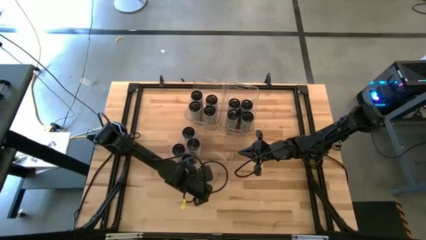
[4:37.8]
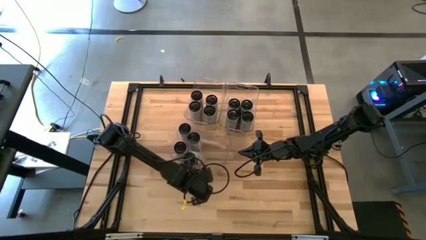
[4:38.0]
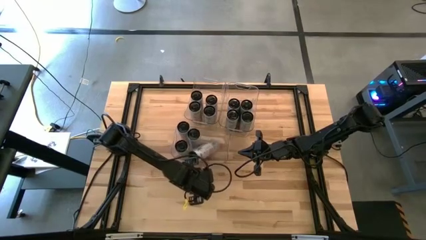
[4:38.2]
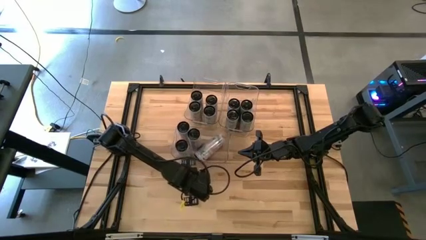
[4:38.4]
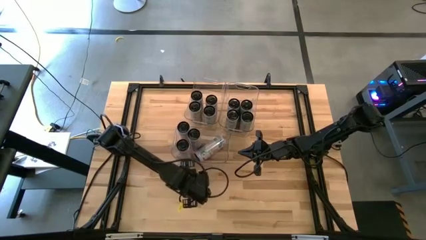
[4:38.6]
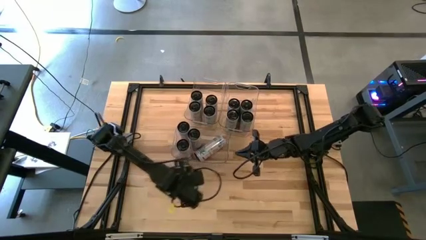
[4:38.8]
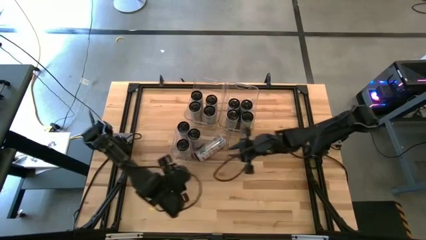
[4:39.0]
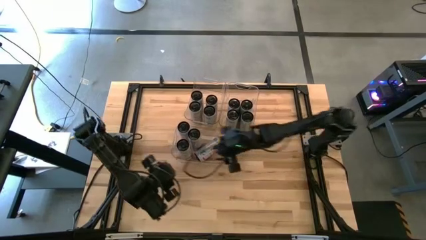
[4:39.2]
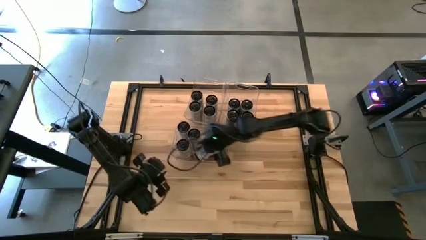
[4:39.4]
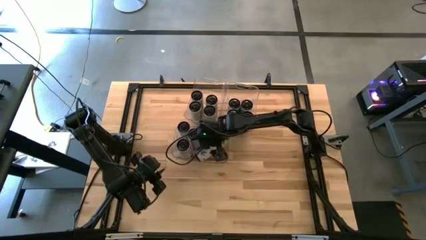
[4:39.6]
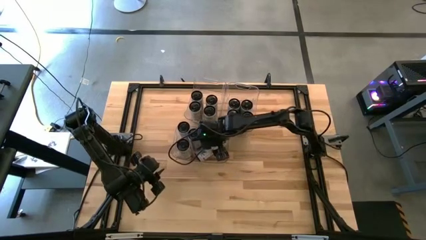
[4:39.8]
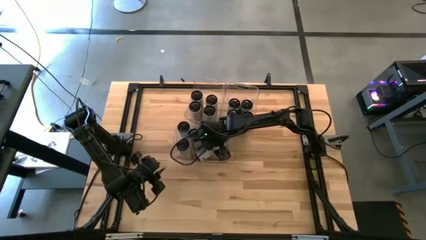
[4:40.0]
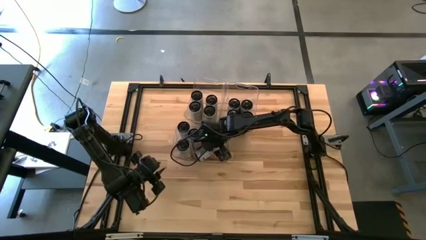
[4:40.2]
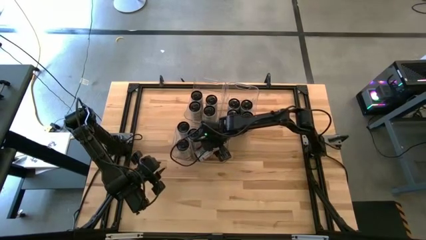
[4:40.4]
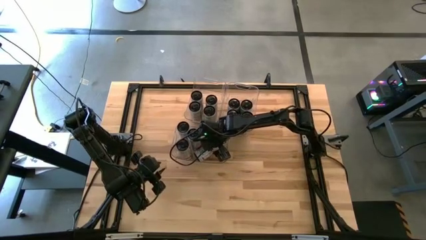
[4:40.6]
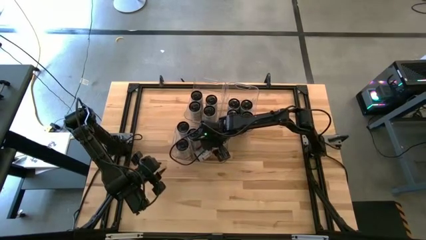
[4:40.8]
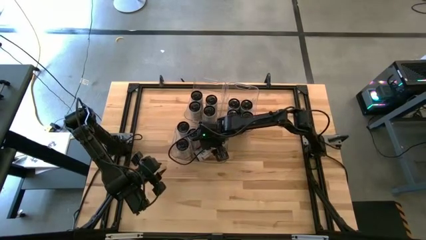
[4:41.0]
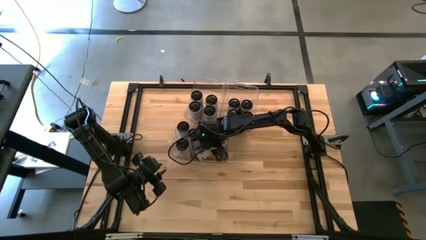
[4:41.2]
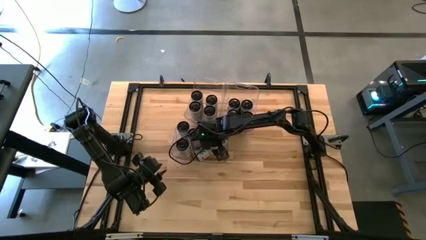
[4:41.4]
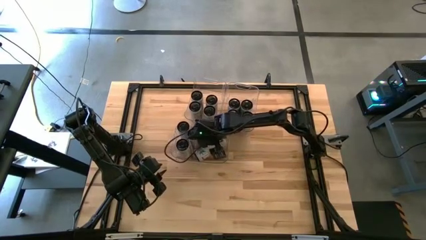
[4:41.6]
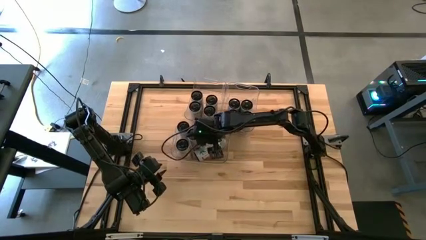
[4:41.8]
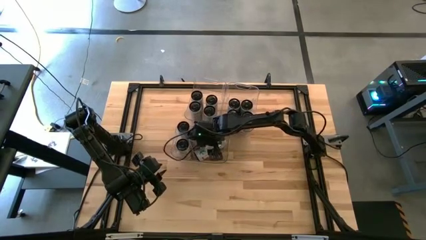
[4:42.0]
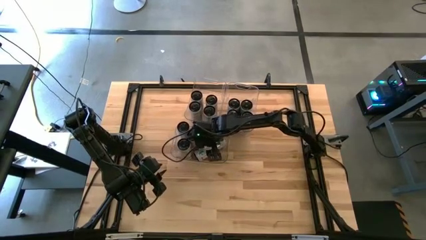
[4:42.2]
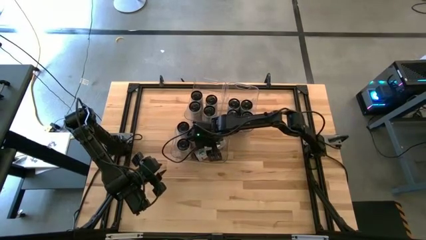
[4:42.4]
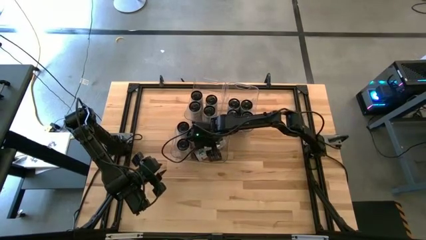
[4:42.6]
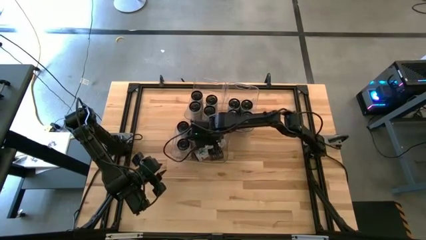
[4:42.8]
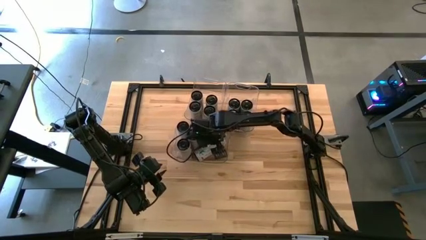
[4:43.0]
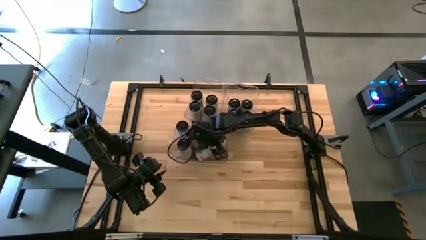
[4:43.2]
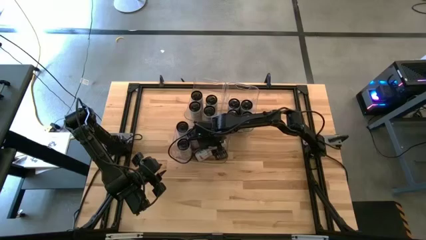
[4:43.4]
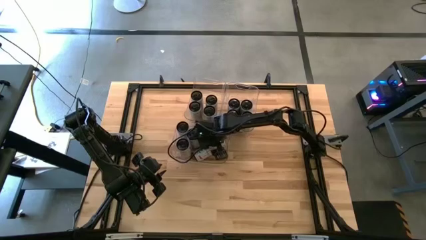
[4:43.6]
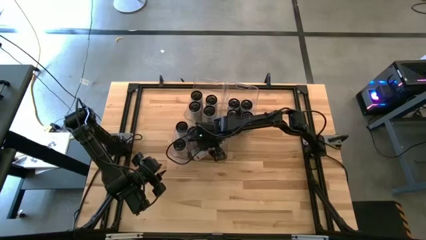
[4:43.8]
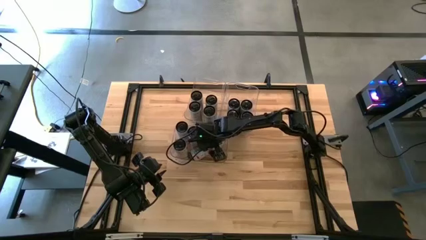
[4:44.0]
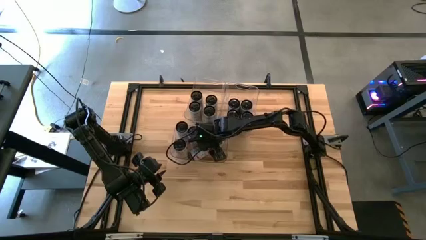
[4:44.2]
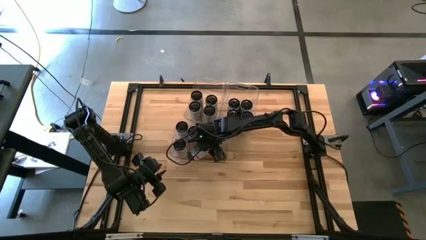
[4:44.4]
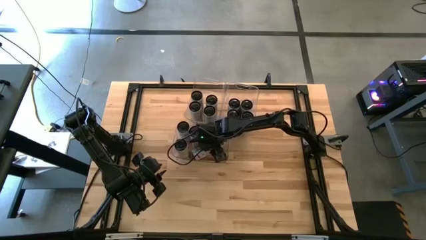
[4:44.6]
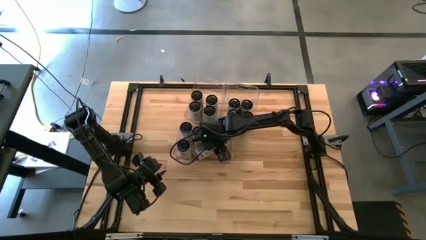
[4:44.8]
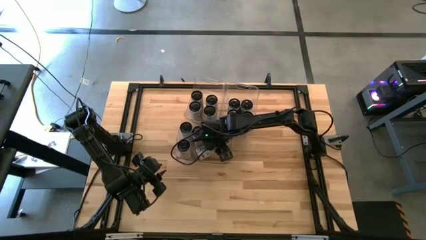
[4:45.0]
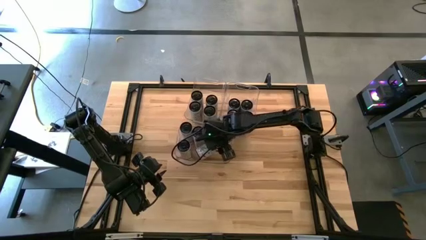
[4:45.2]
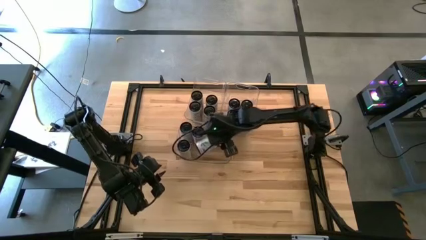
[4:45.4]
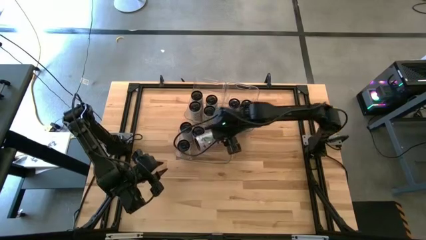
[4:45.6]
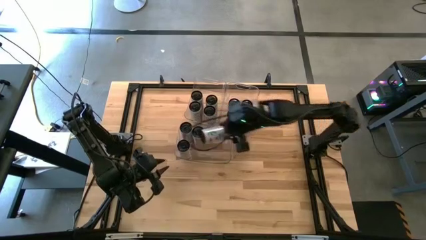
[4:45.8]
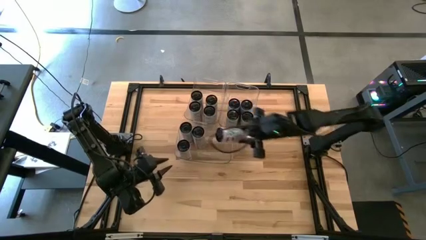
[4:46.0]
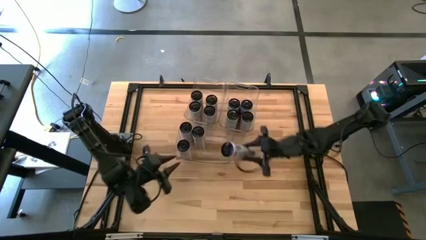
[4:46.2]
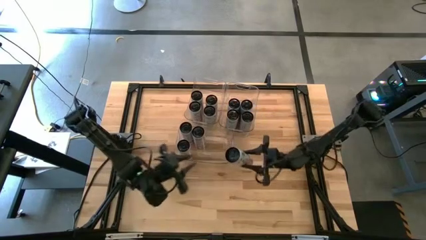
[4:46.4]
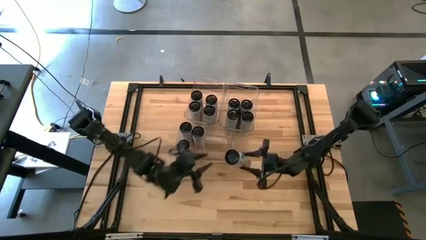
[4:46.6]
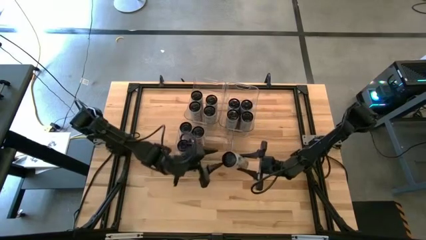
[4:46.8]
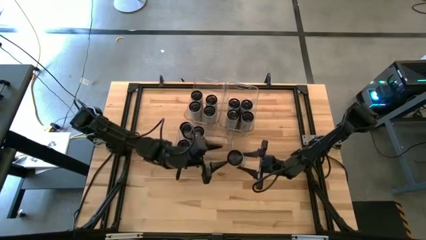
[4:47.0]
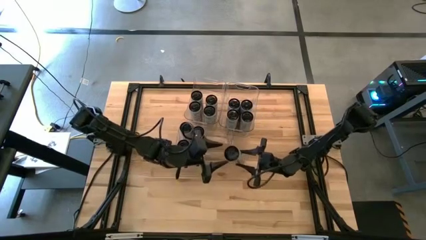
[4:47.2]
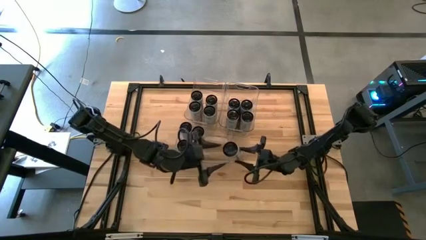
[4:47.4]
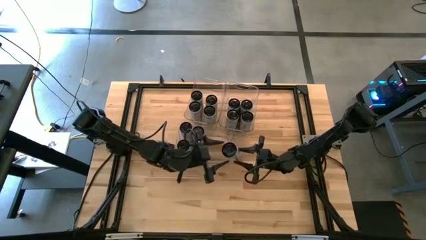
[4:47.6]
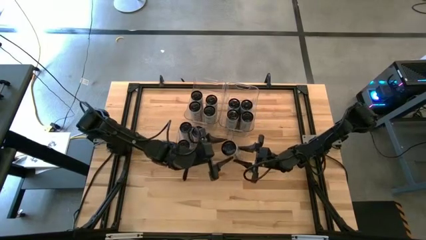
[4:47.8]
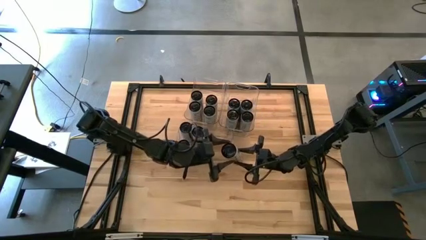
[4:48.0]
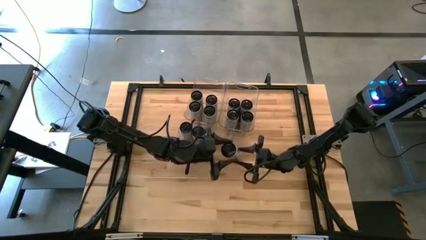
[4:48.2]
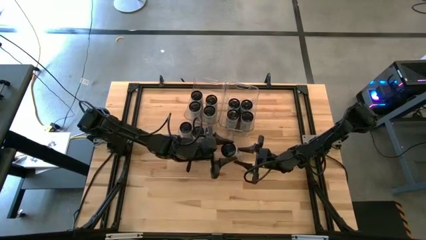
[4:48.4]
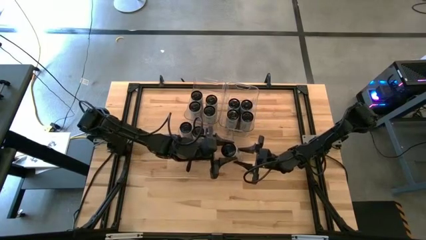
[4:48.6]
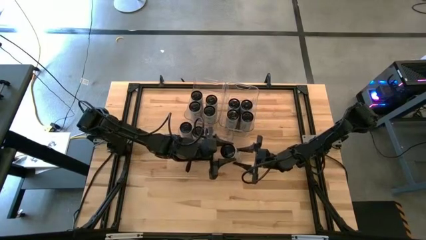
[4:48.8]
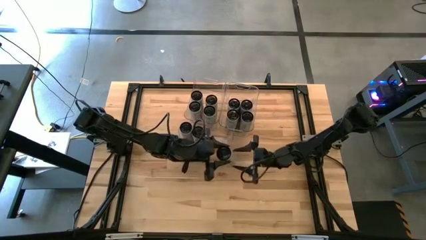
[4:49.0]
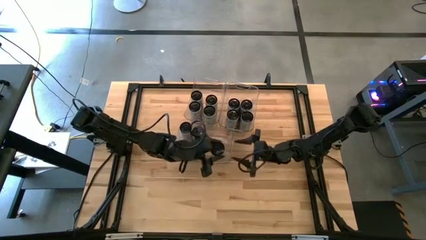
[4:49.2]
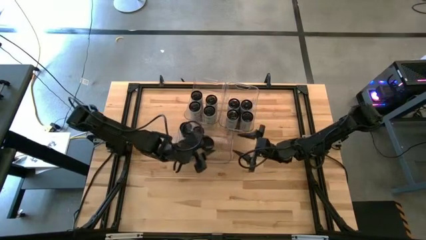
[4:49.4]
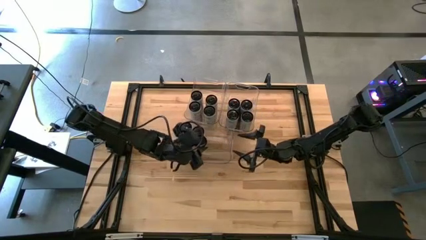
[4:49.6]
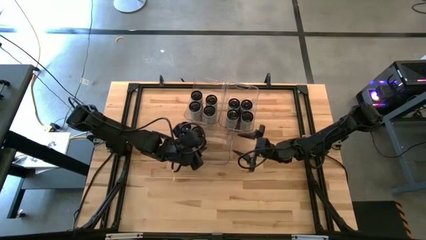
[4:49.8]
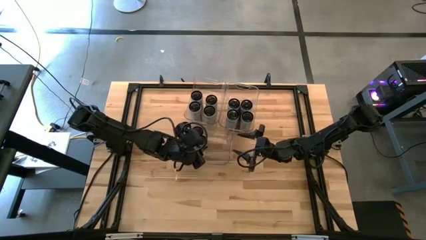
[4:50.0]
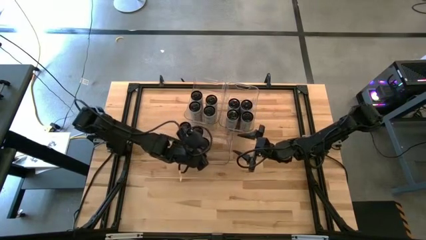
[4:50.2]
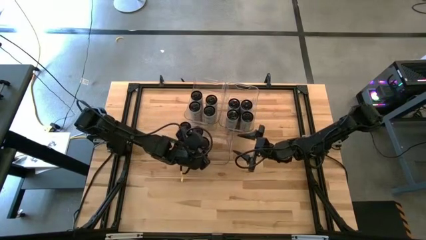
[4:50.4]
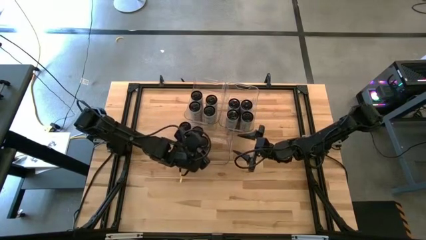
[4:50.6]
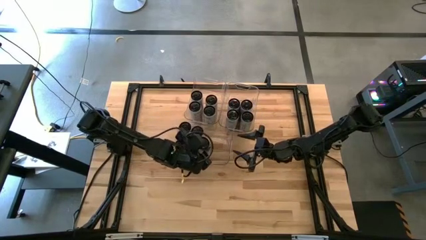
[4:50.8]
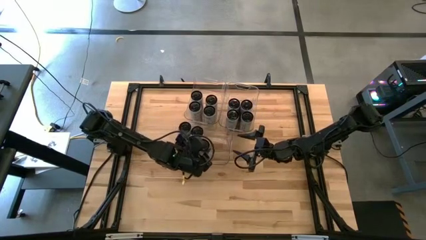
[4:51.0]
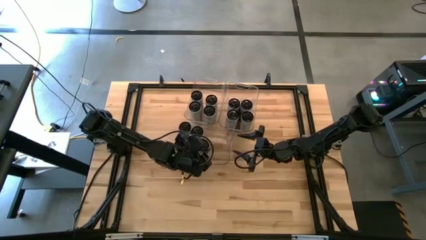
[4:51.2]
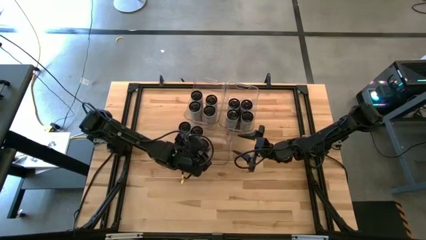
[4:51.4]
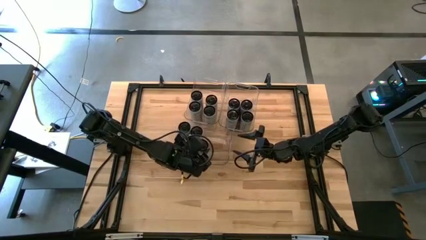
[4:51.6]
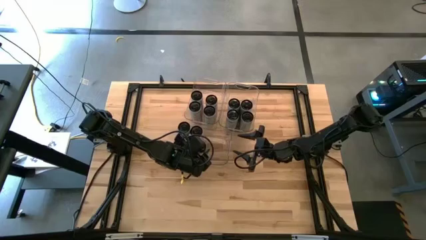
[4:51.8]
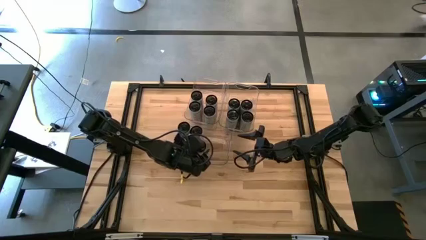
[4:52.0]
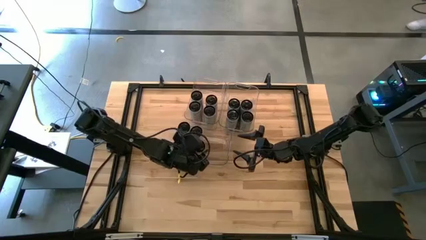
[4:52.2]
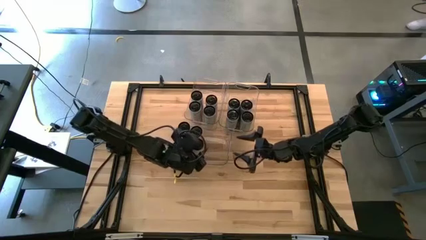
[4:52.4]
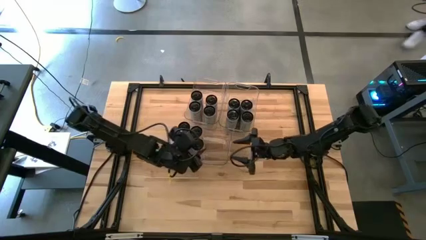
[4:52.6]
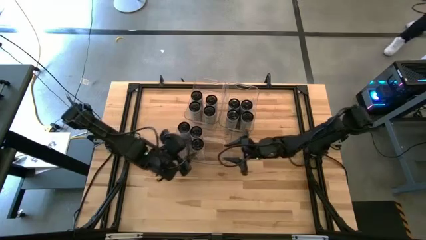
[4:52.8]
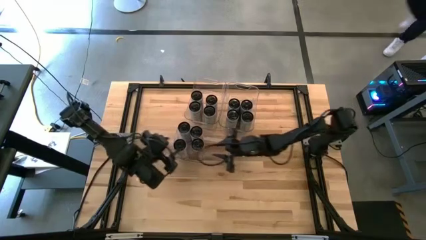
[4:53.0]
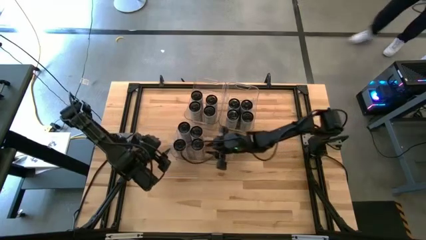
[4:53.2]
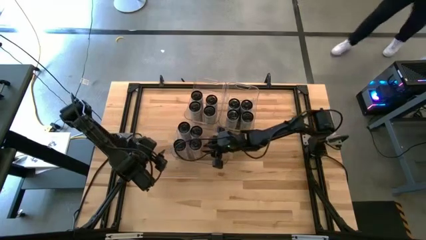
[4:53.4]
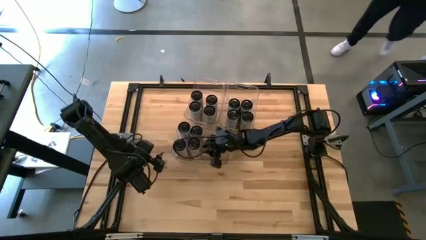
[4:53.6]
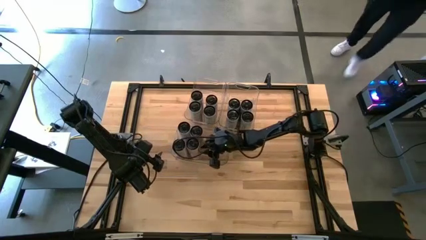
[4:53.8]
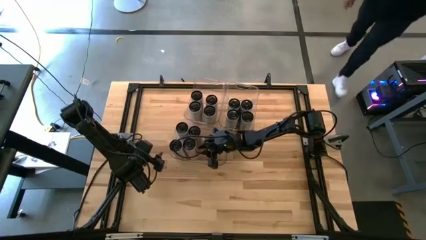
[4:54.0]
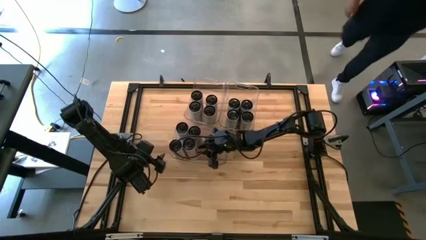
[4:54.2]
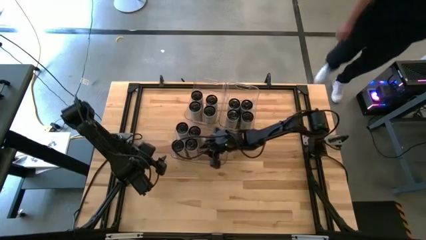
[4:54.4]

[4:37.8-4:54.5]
Task: Sort soda cans
Adjust the white-pink soda can in the bottom transparent bin
